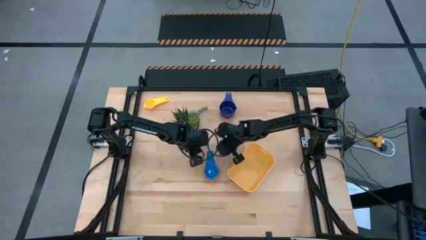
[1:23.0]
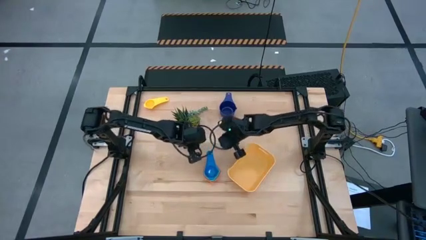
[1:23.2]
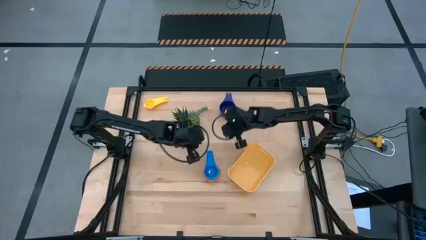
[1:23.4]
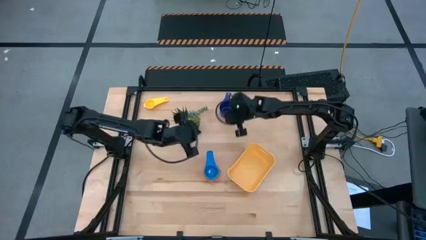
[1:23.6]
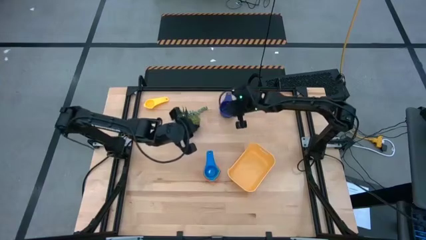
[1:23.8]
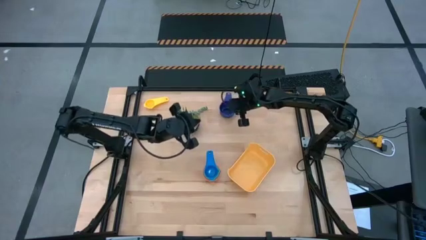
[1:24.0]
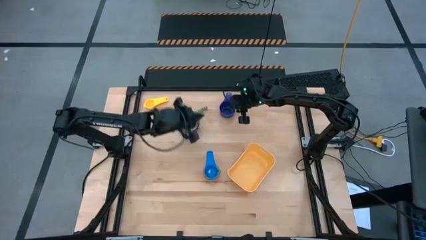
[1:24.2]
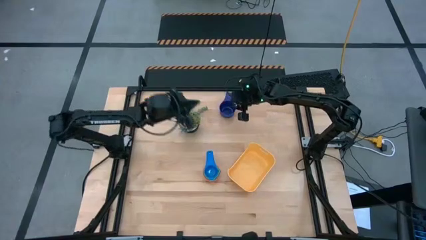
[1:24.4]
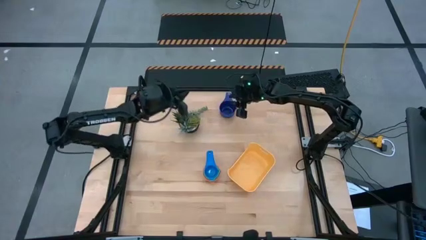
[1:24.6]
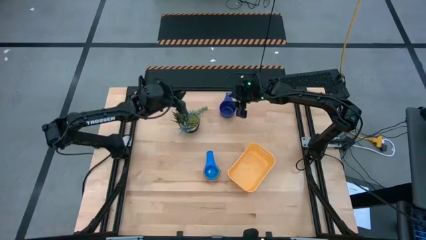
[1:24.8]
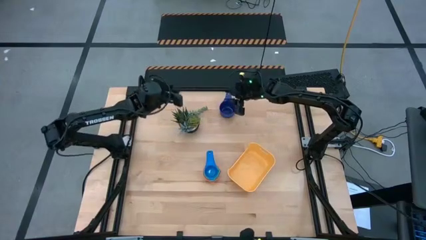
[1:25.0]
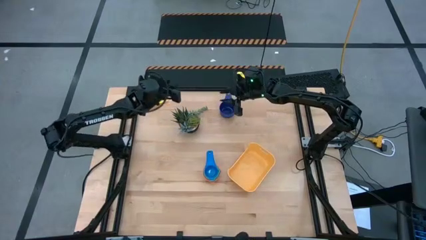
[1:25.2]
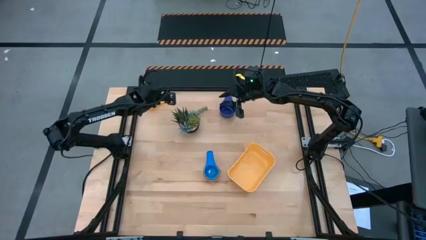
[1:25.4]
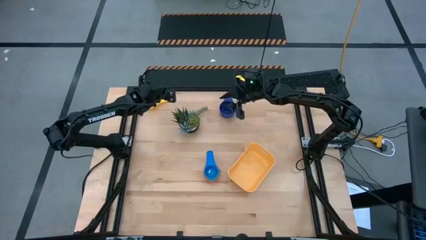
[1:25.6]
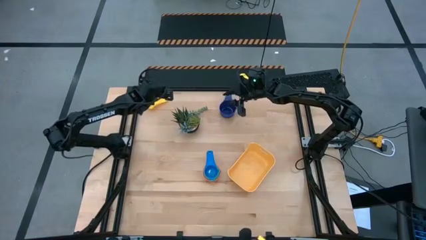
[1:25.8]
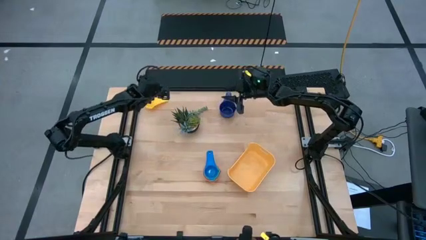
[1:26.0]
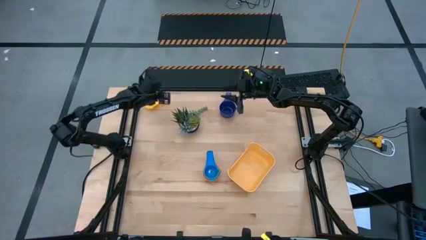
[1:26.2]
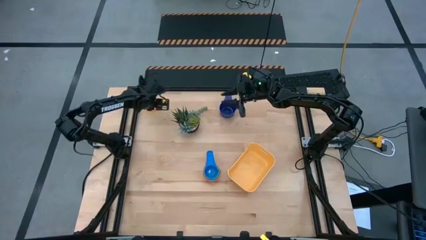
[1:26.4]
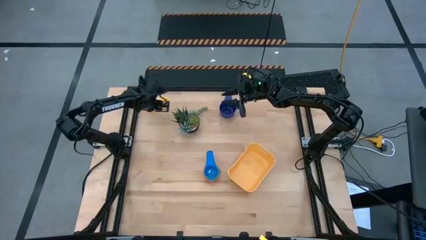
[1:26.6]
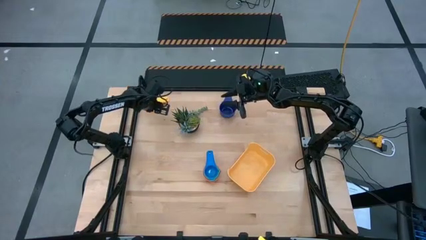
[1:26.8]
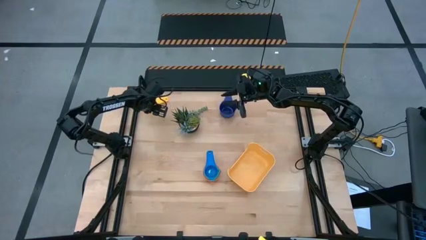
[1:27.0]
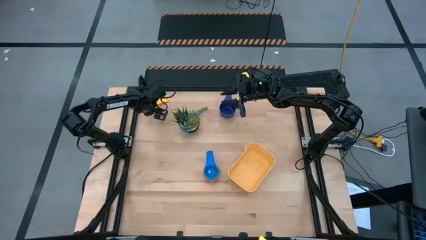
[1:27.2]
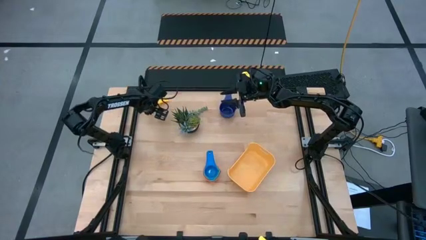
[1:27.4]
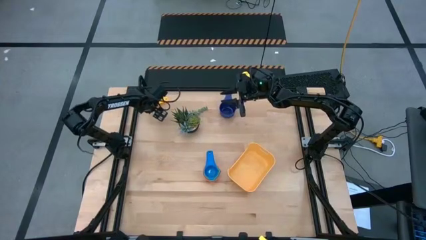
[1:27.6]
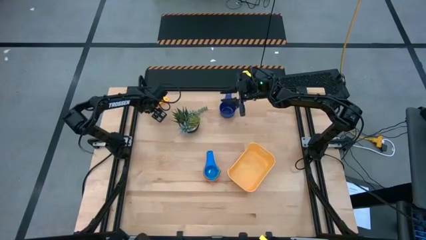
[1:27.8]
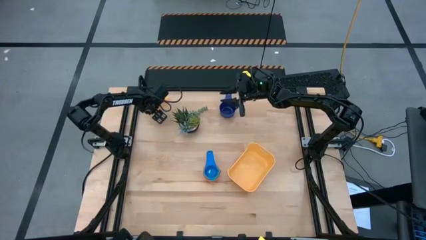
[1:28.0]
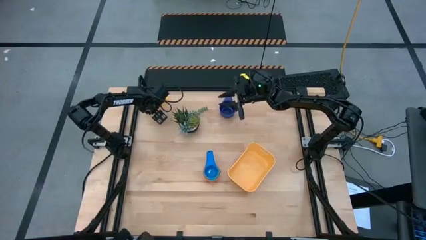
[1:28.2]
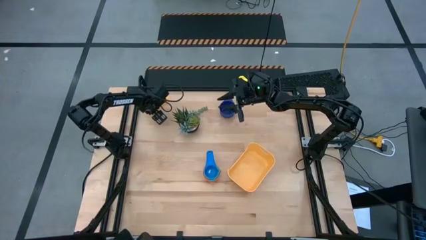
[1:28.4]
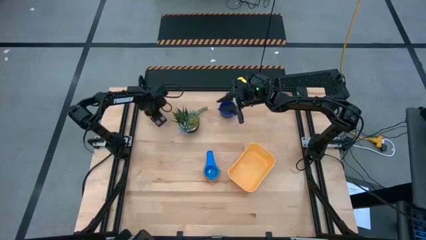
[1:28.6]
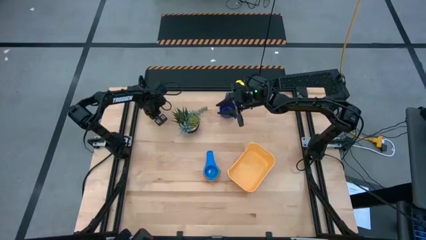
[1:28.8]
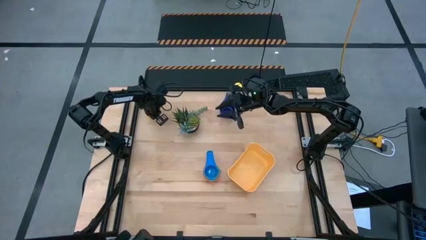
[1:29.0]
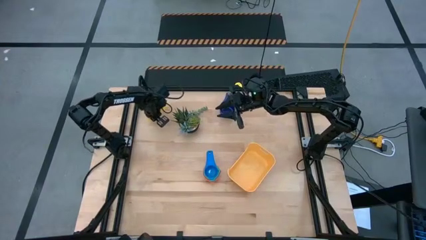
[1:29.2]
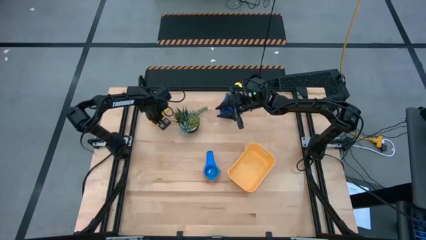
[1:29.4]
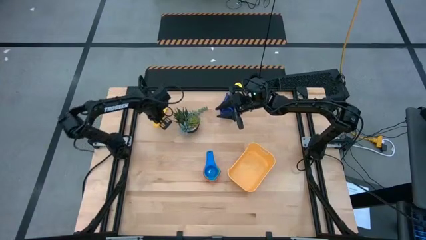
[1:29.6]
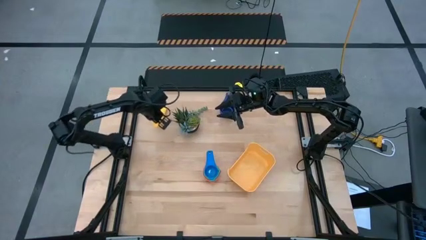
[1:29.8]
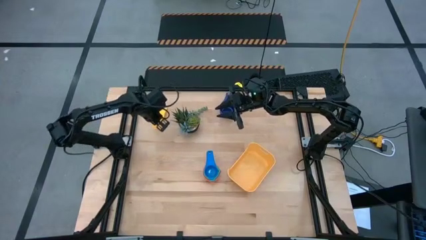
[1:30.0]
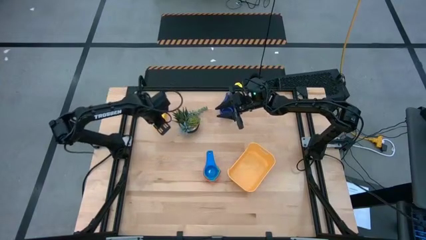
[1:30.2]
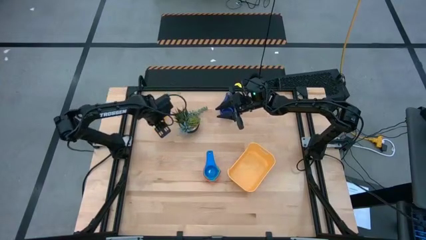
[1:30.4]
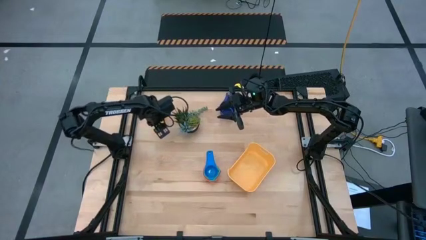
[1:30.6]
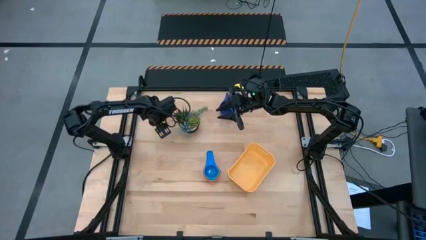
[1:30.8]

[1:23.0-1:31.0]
Task: Nest measuring cups in basket
Stack the yellow measuring cup on the light blue measuring cups

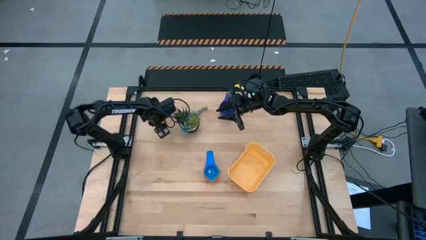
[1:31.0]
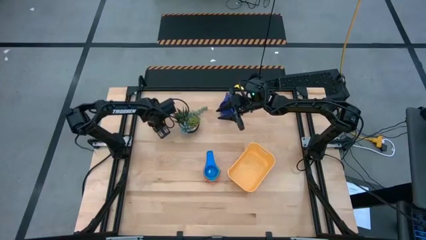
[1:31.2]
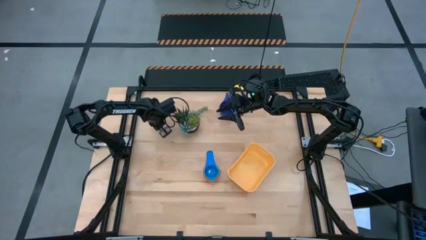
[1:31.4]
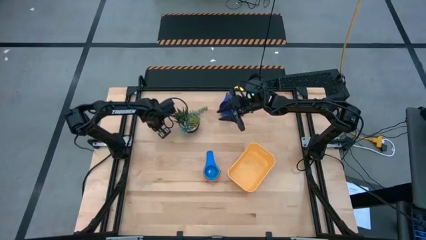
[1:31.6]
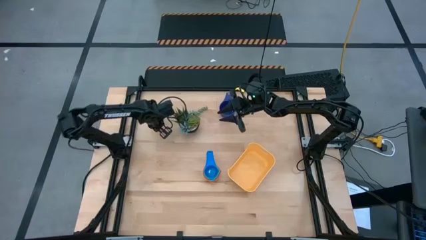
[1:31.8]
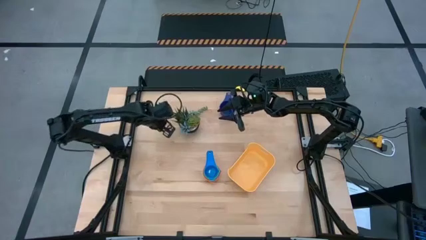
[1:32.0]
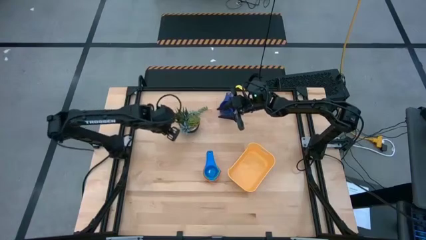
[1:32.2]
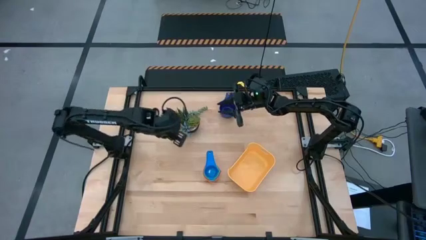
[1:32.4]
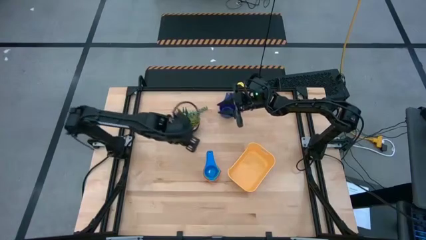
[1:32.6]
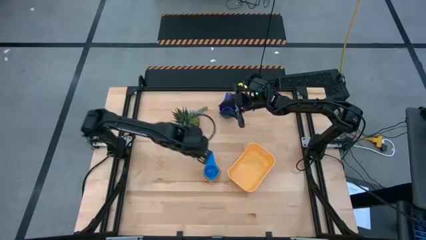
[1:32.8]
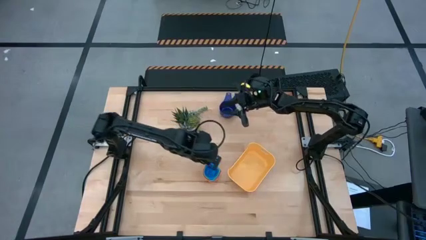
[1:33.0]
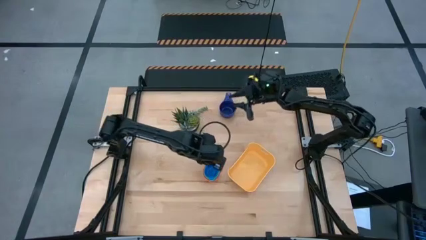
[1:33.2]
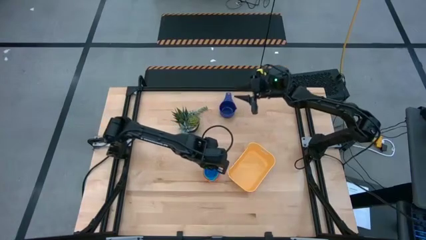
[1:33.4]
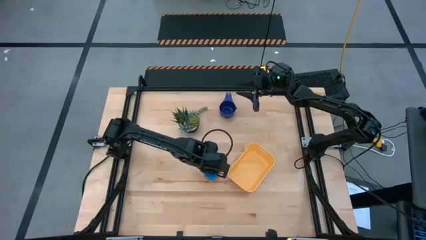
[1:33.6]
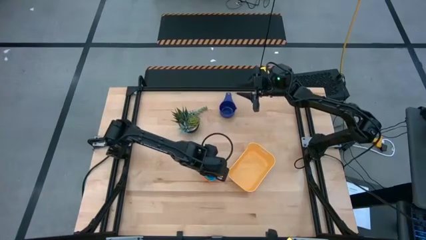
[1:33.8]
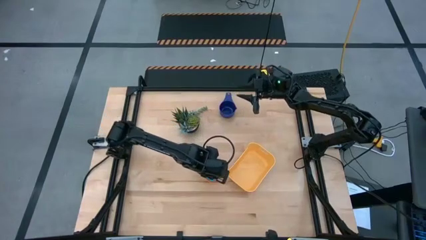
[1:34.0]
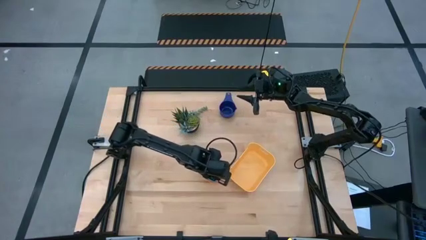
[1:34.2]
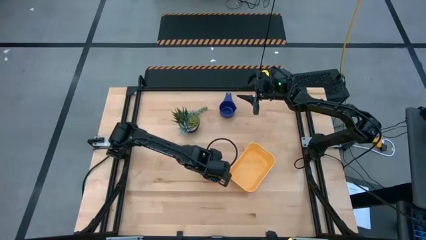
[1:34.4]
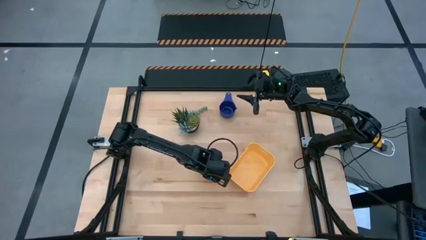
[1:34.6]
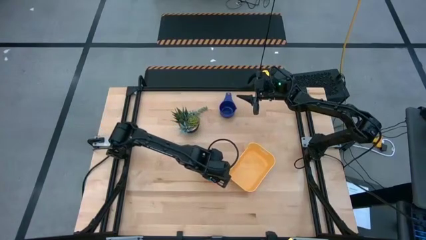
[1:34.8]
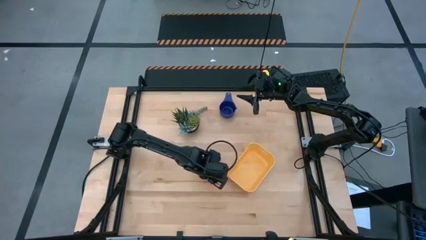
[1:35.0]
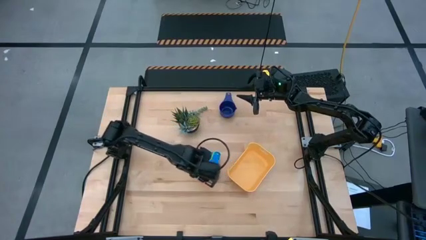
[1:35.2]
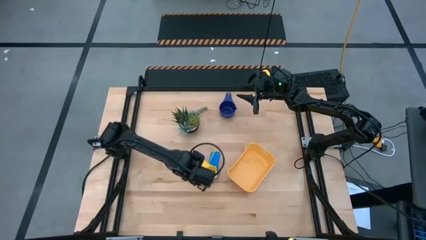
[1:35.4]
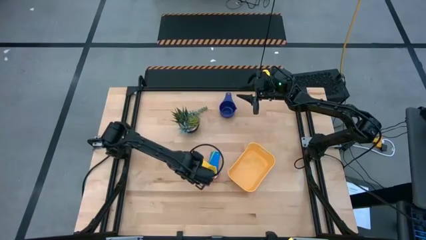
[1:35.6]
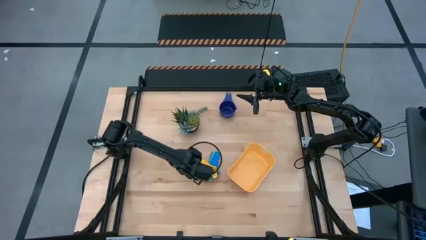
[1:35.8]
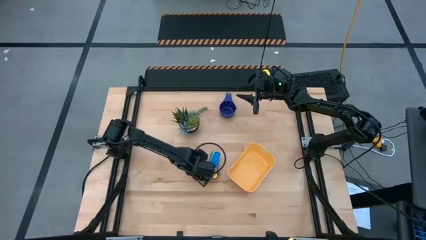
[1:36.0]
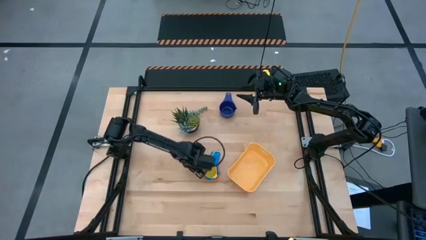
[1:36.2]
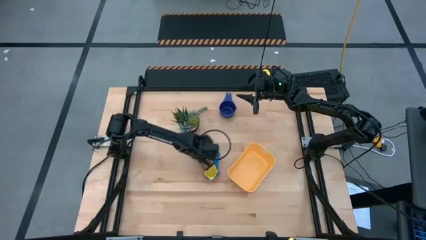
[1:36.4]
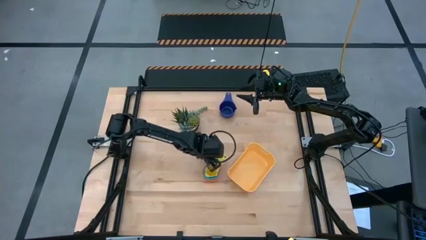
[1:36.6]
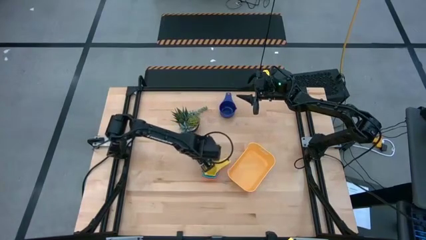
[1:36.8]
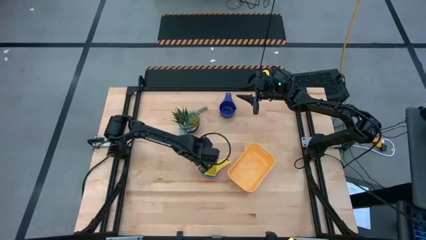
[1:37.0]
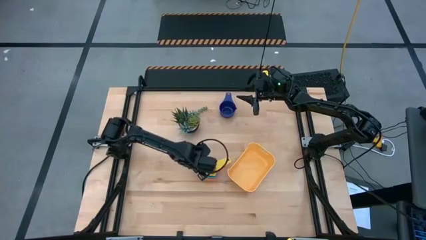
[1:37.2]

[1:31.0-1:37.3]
Stack the yellow measuring cup on the light blue measuring cups

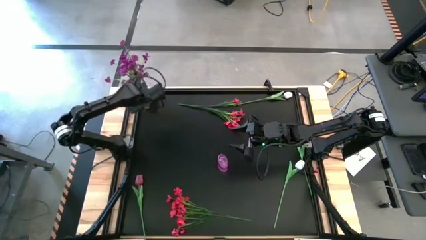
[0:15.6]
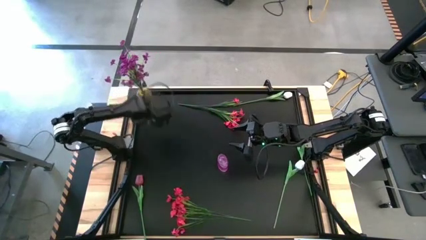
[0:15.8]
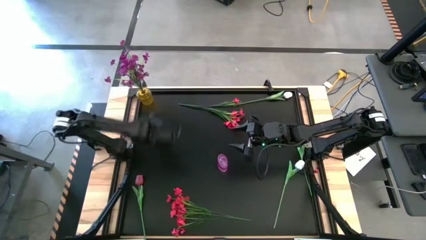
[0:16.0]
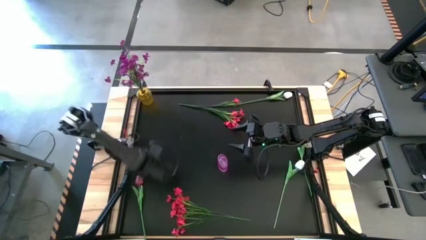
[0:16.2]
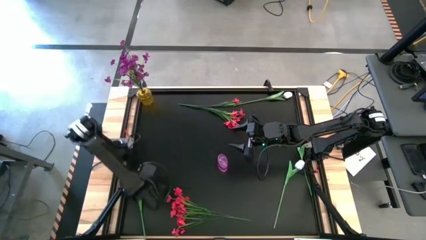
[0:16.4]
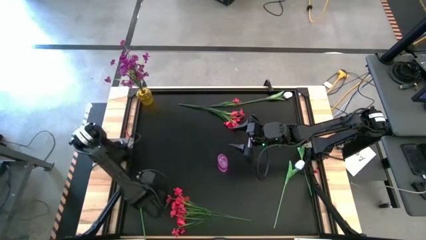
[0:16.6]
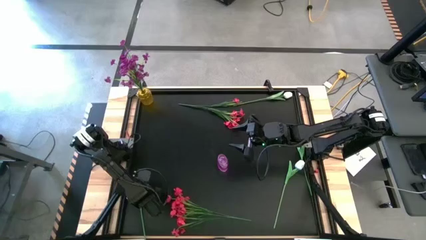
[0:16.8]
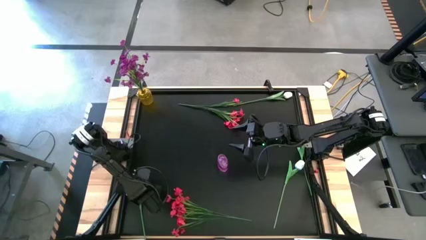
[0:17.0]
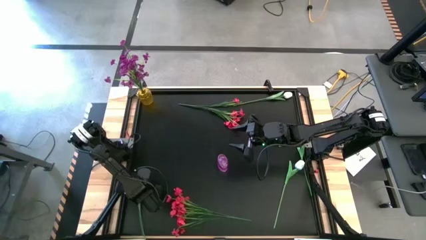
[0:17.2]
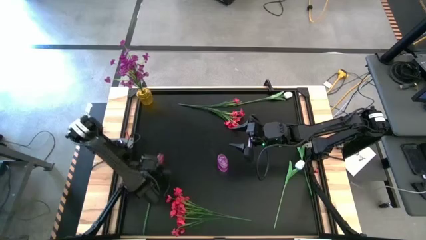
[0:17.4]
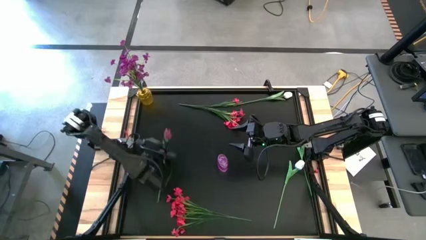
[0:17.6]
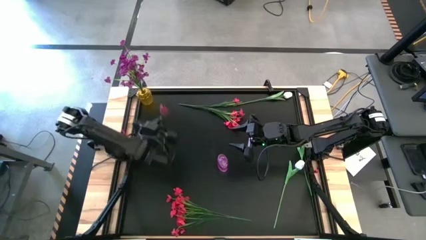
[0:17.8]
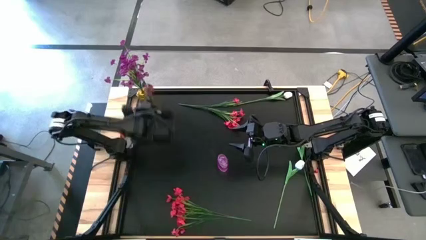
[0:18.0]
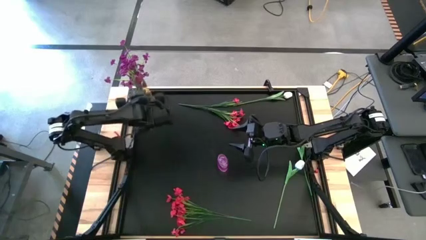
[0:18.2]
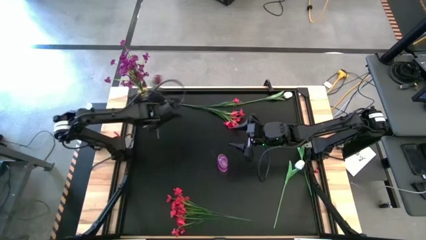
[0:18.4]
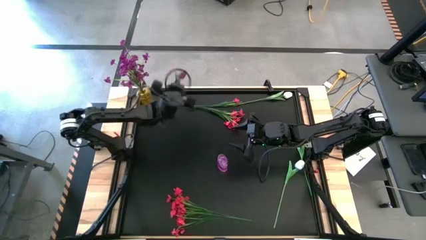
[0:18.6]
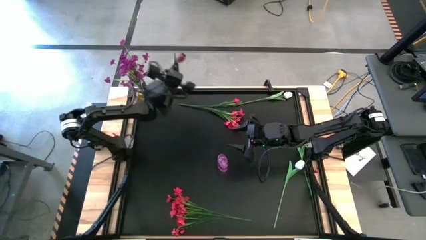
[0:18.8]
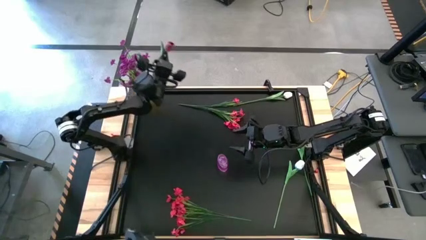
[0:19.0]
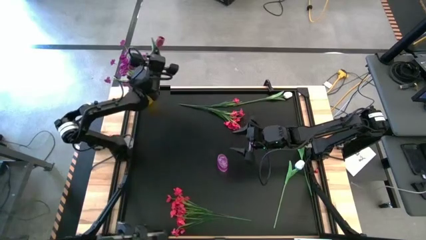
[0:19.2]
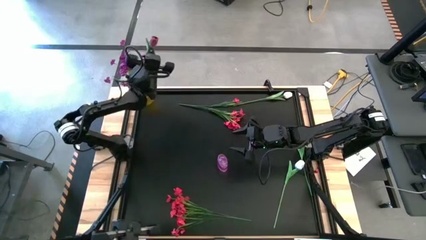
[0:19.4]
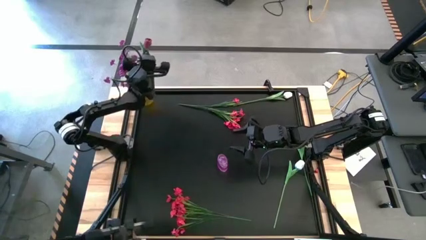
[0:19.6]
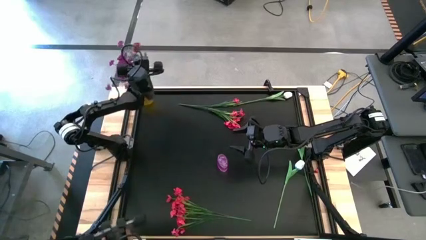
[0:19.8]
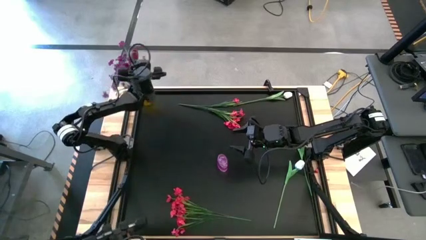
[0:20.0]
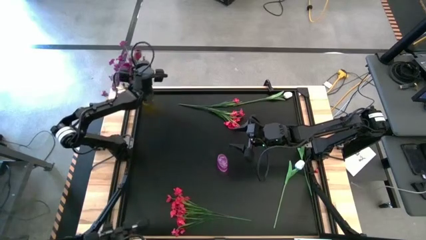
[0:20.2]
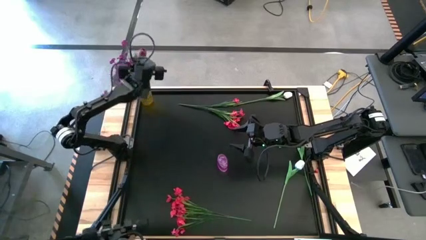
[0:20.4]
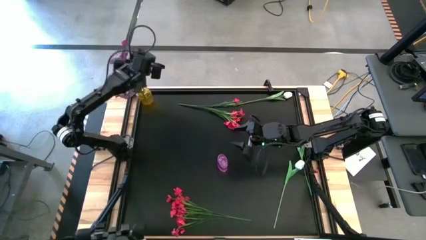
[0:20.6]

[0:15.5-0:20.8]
Task: Sort flowers into vase by color
Put the left dark red tulip into the yellow vase
